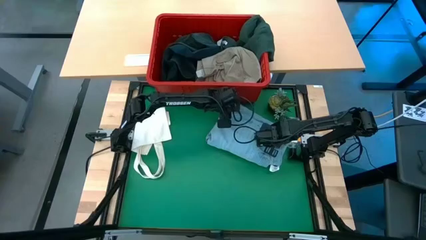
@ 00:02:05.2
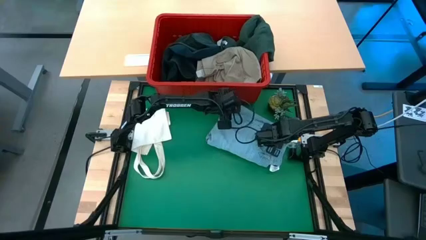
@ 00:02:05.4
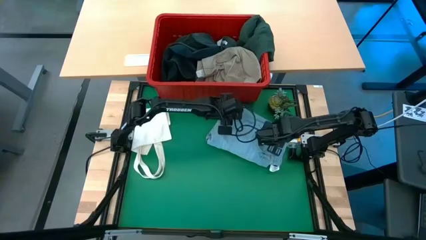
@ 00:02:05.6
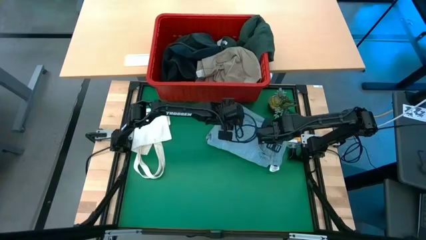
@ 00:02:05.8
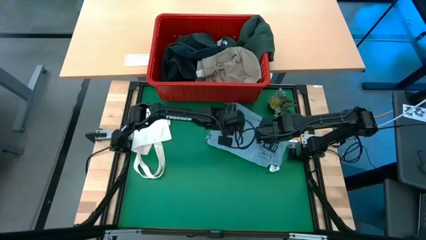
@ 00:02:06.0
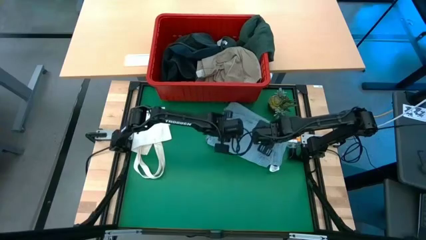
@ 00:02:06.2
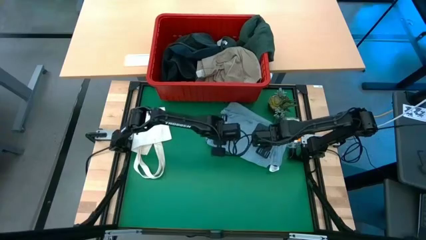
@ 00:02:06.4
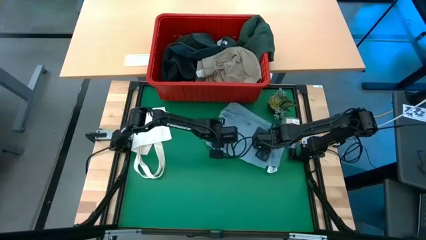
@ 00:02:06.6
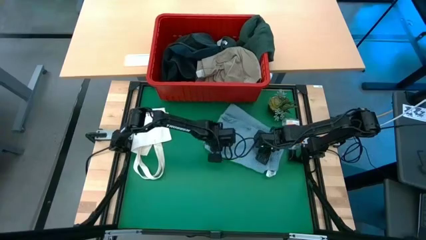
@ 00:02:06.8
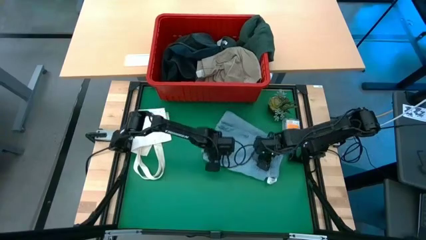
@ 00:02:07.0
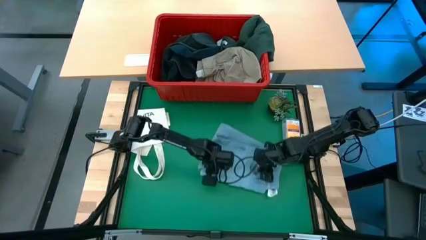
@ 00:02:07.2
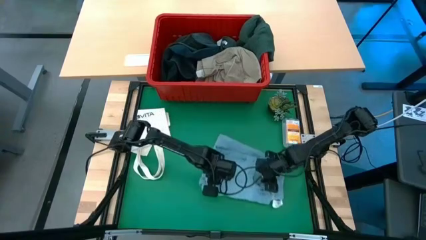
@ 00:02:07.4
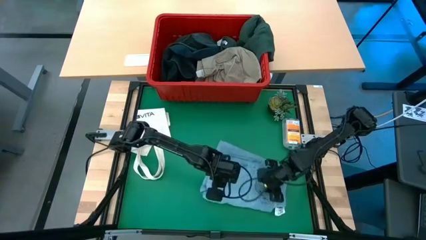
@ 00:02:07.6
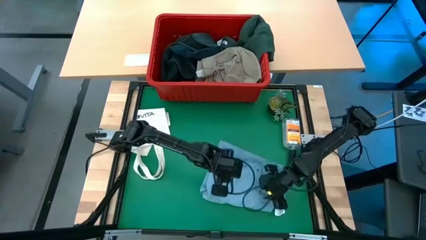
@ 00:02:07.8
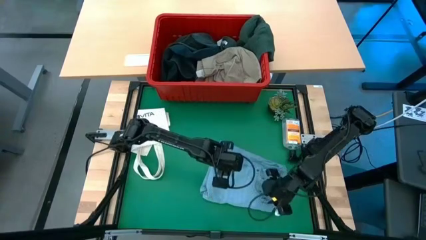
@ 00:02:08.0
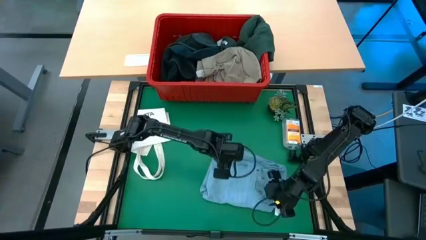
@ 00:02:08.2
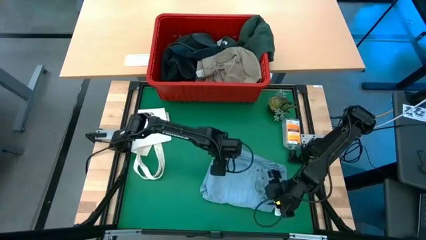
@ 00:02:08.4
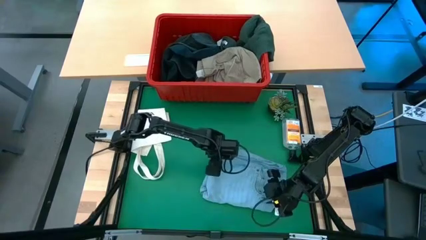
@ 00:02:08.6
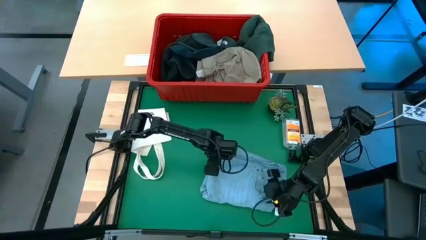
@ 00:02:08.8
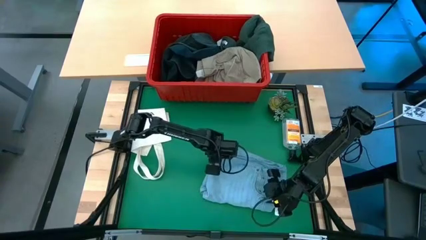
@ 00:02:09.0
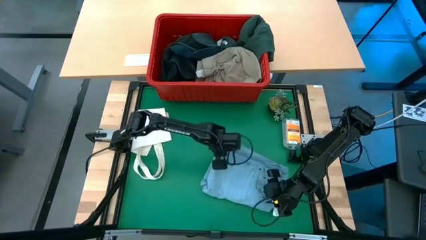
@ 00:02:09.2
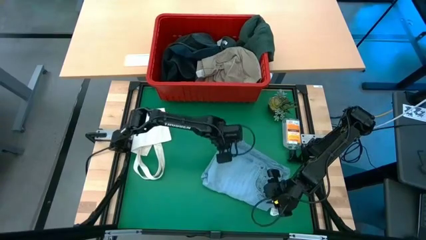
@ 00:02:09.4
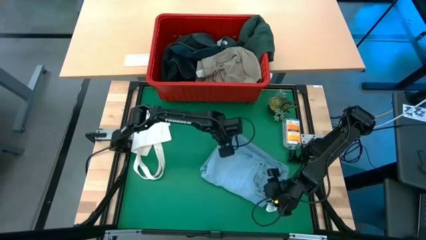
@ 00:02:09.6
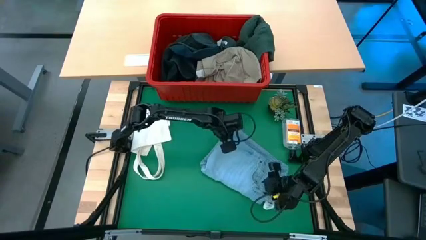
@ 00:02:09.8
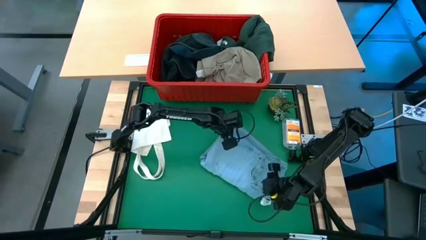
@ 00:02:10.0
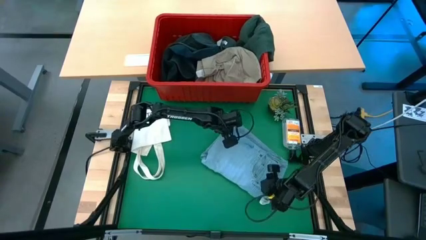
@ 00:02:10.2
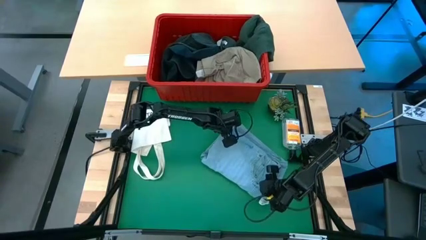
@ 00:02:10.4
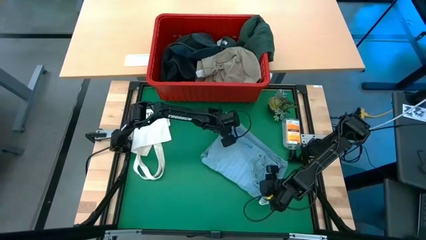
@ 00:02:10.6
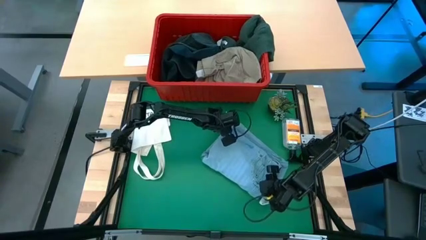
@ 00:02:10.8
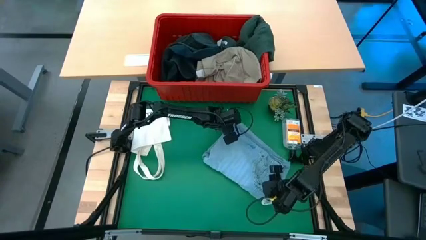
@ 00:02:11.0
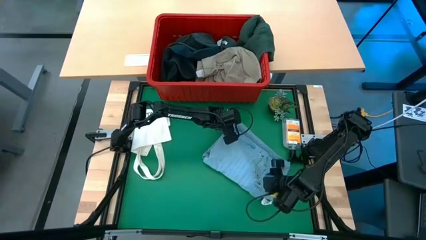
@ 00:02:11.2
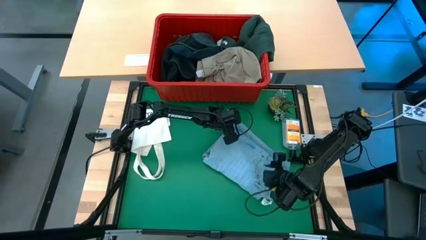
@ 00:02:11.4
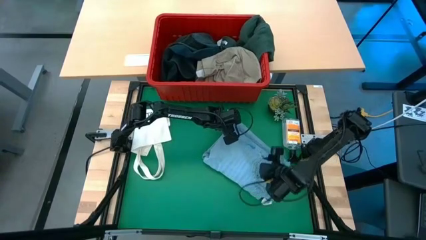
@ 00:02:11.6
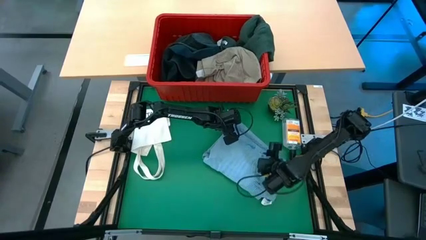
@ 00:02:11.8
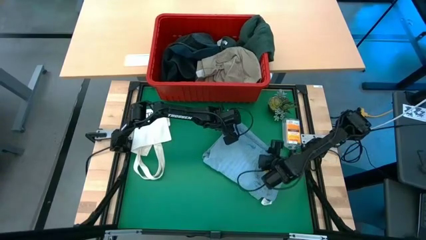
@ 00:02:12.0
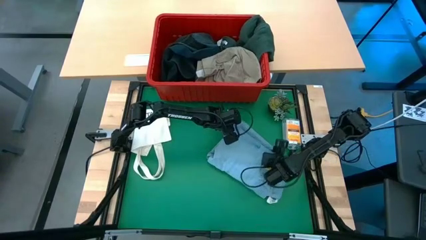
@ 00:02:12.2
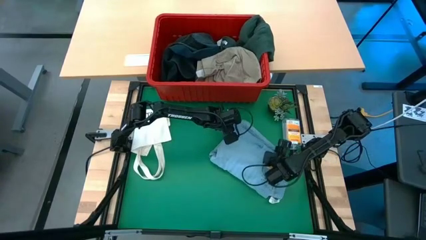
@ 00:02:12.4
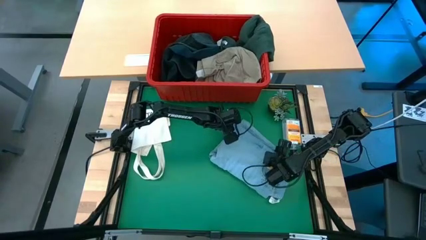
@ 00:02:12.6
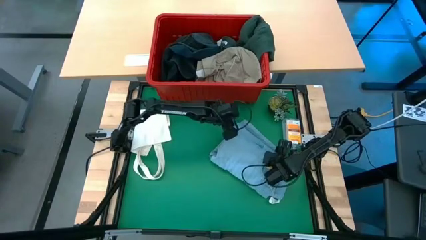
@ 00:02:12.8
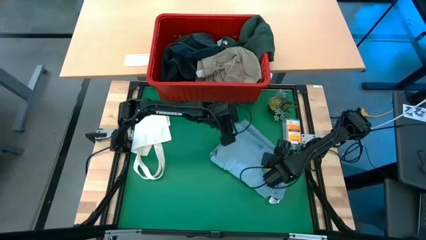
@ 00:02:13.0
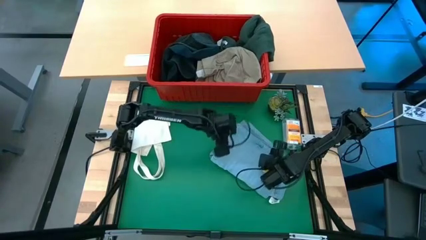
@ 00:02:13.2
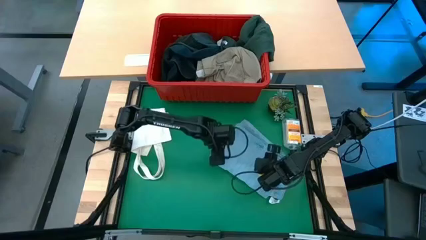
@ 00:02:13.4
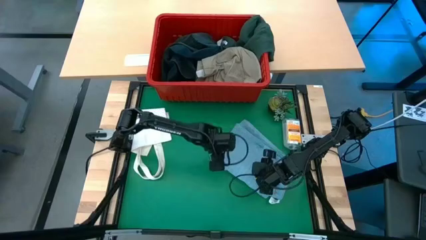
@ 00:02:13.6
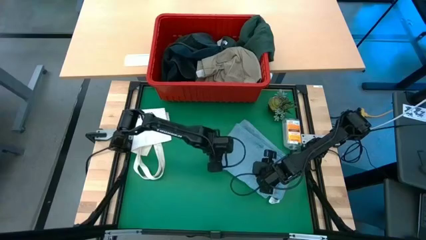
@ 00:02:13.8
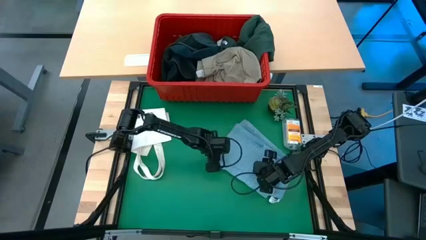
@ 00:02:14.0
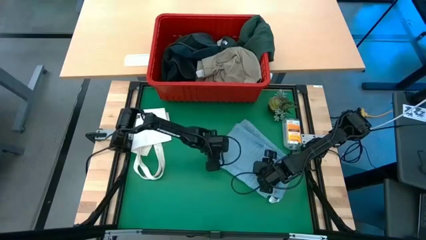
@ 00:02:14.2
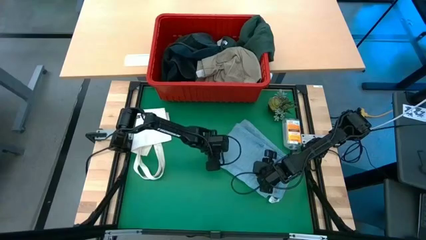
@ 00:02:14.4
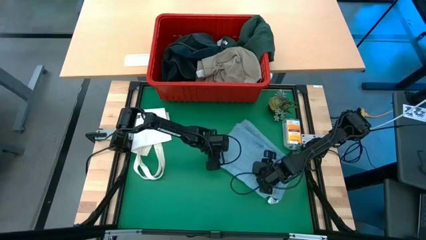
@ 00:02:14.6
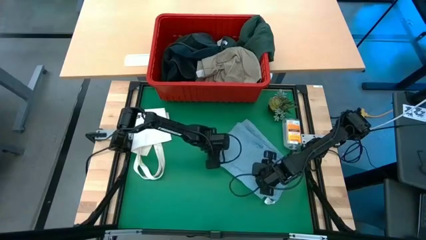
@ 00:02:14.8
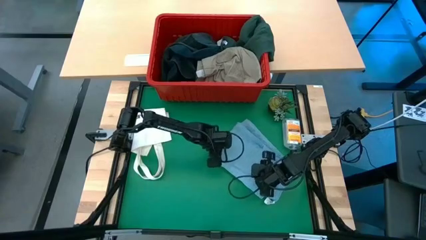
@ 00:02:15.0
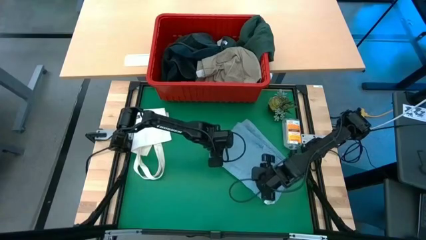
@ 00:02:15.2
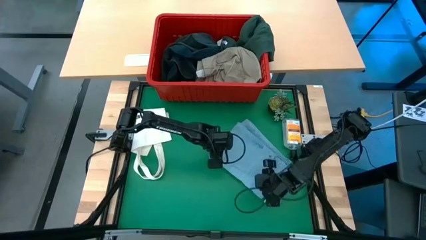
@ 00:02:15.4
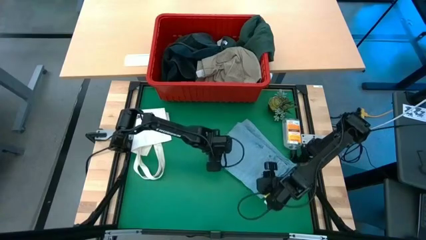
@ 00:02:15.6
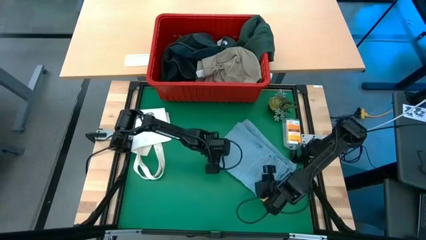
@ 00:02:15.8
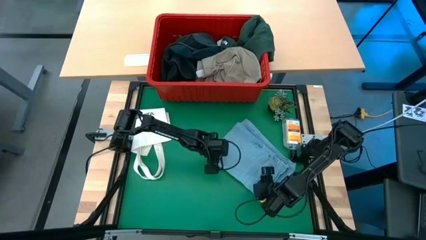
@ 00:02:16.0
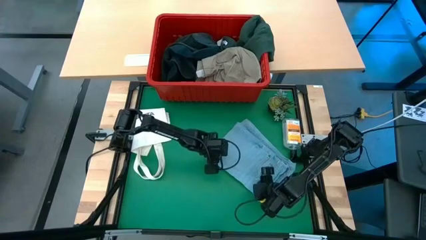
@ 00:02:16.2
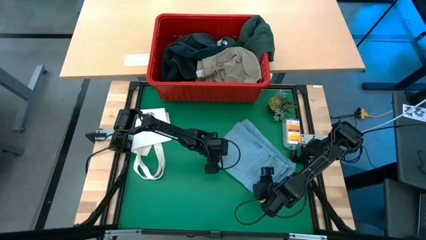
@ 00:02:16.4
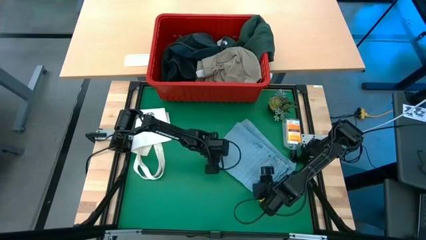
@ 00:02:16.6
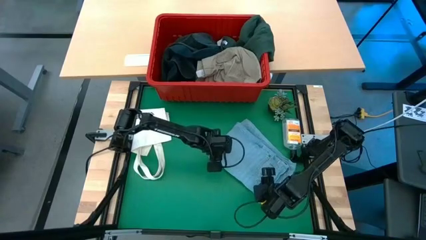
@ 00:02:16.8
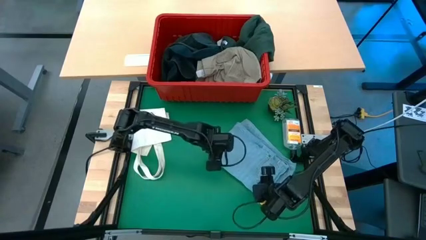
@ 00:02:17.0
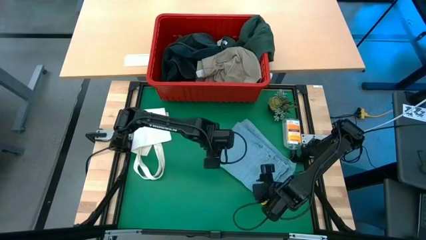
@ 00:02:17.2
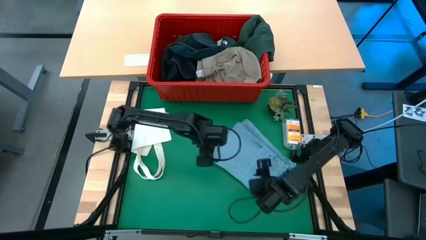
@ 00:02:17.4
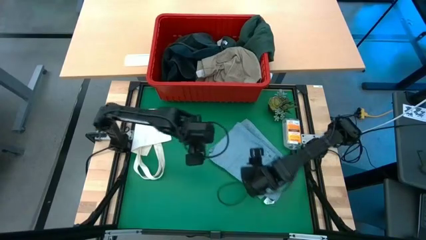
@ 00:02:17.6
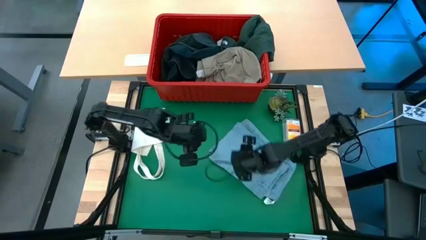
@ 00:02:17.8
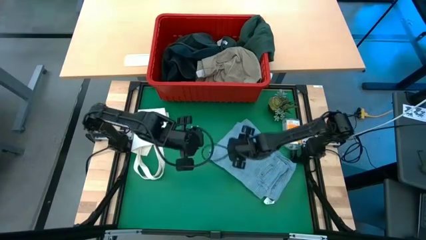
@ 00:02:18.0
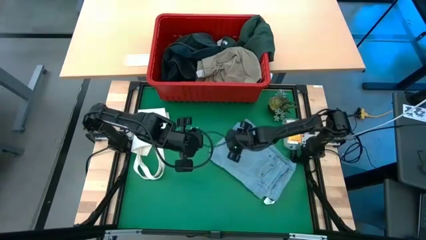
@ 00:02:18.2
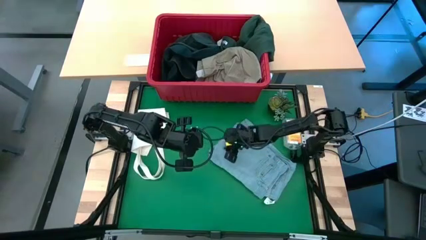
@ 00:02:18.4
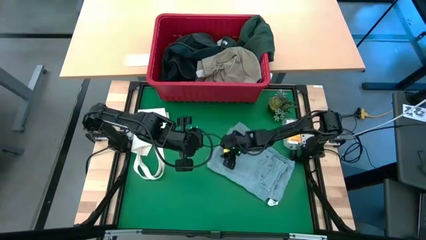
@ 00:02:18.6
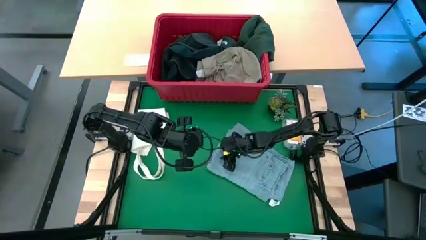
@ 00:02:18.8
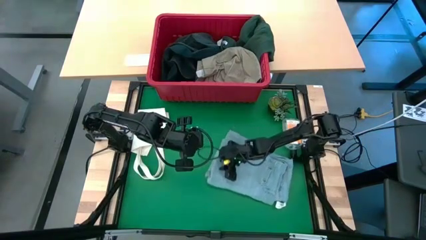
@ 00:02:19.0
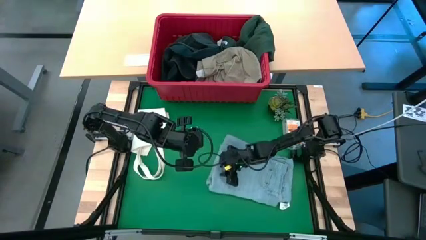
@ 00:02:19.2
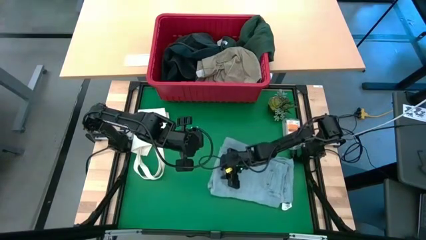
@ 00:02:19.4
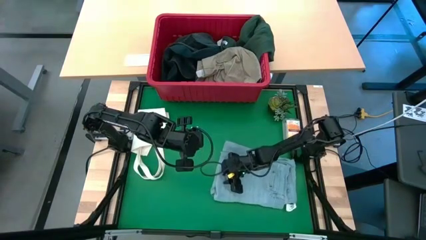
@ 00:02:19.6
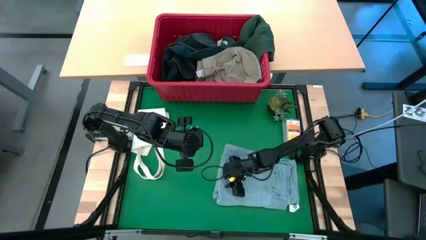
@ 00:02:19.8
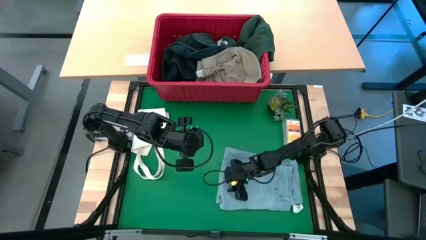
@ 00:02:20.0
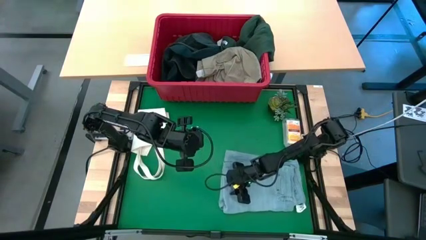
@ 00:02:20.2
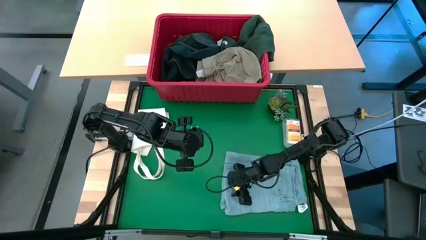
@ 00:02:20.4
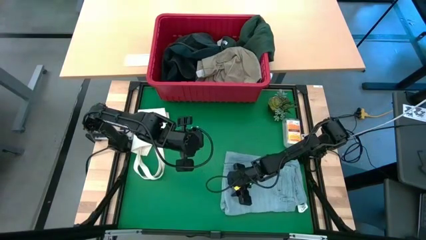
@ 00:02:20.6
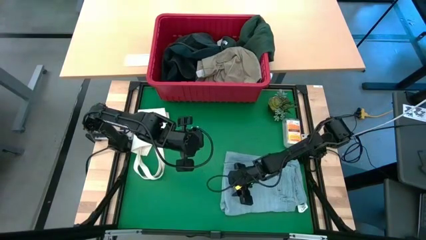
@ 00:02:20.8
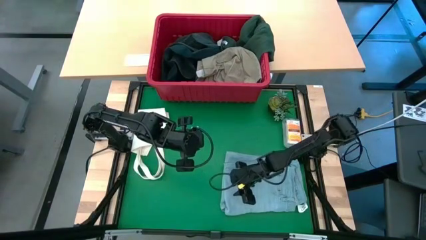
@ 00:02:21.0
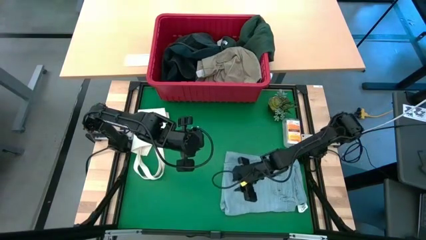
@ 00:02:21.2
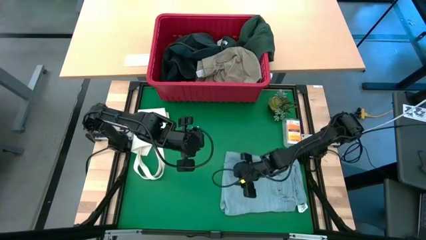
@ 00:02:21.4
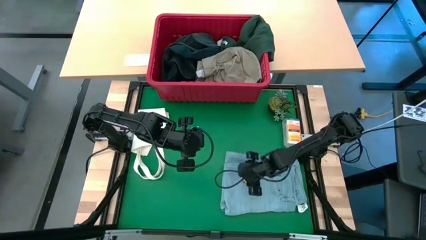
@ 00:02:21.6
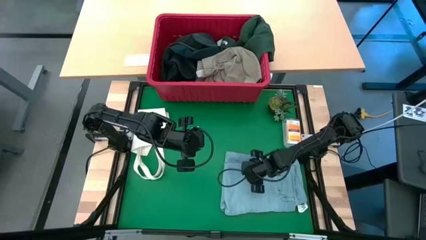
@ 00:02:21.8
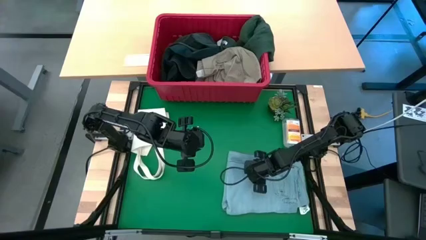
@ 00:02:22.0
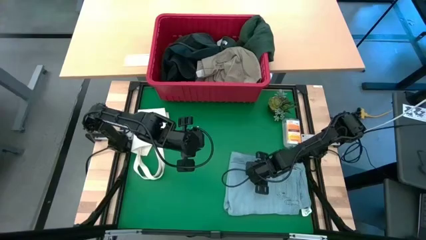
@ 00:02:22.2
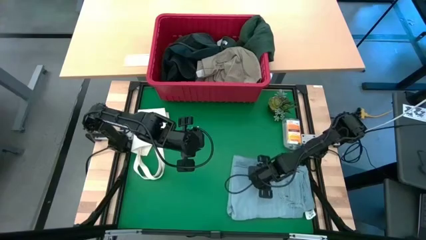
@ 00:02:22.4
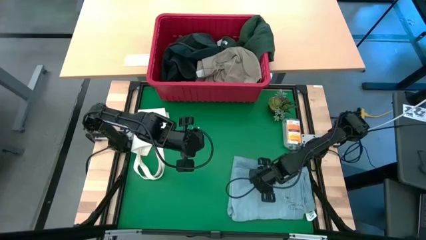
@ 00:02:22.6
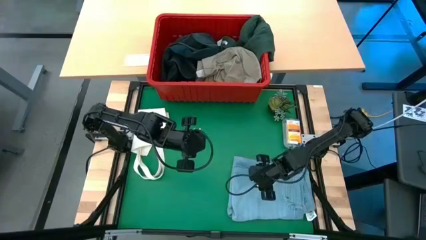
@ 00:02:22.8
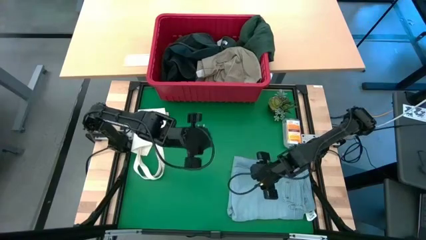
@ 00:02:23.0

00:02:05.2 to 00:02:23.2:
Task: Fold Laundry from Bin
Fold the light blue jeans
